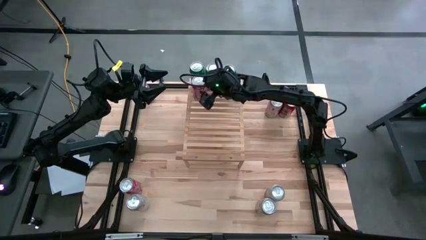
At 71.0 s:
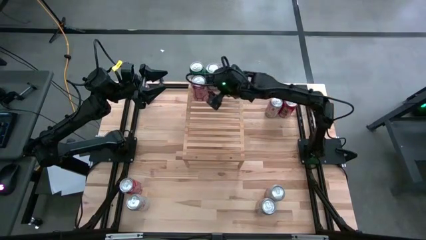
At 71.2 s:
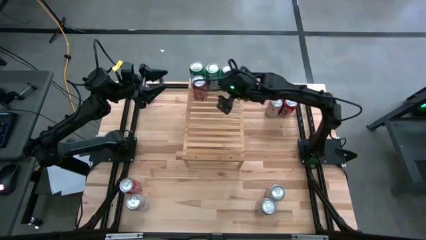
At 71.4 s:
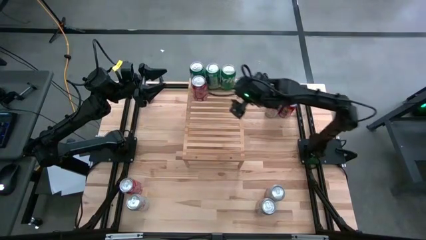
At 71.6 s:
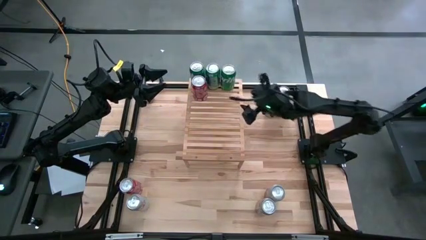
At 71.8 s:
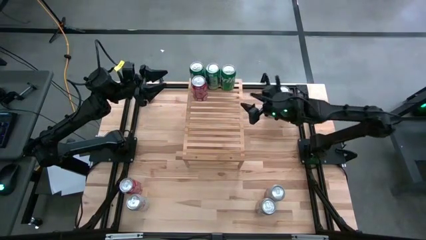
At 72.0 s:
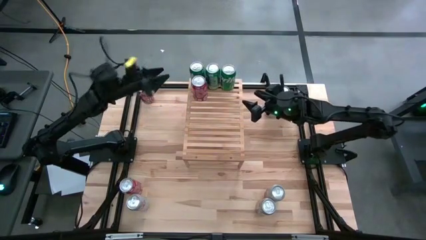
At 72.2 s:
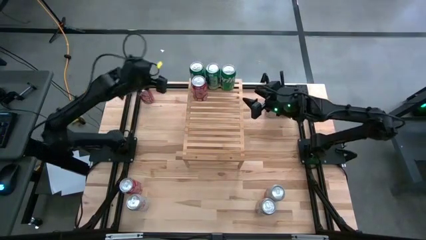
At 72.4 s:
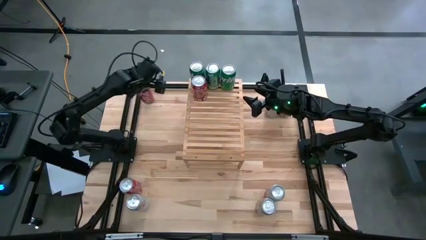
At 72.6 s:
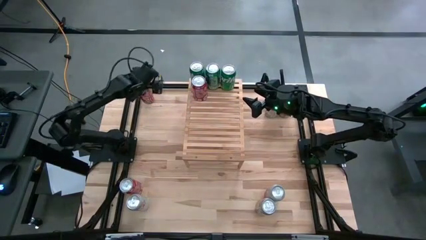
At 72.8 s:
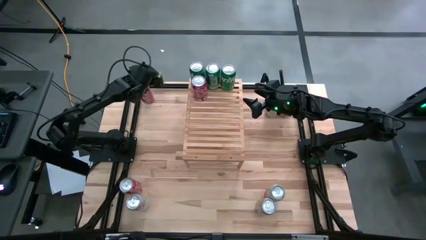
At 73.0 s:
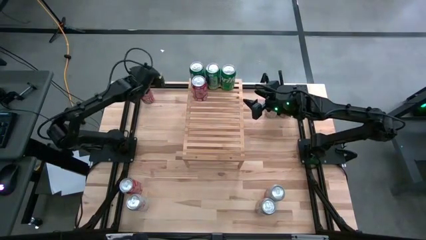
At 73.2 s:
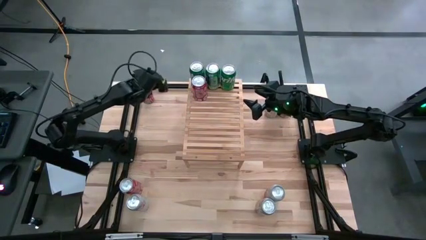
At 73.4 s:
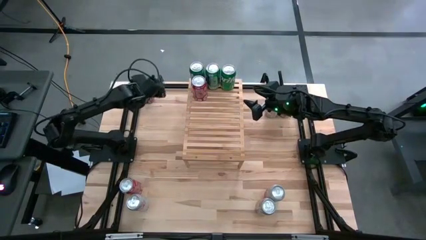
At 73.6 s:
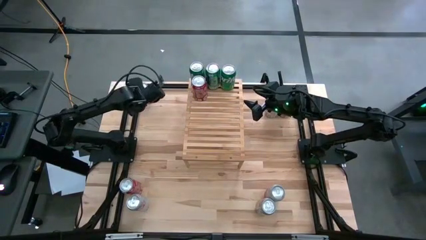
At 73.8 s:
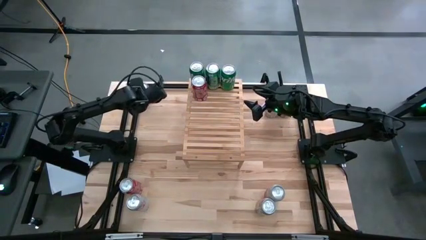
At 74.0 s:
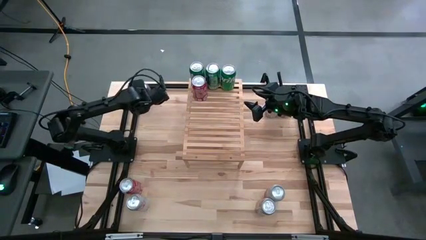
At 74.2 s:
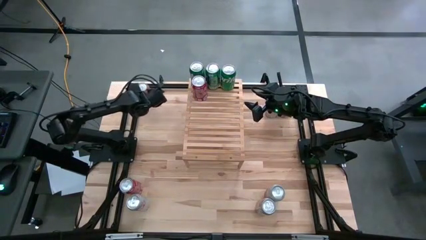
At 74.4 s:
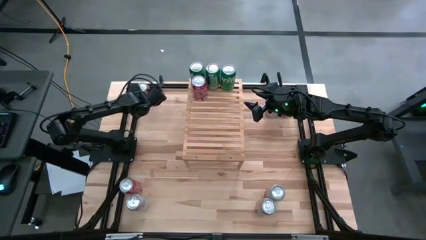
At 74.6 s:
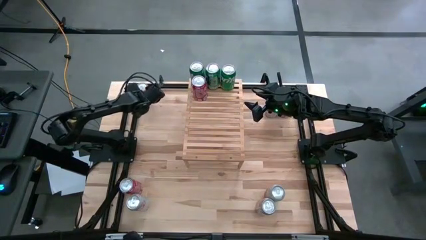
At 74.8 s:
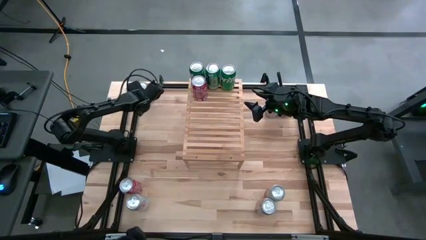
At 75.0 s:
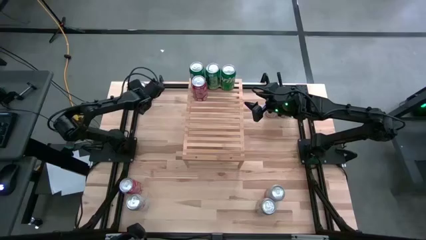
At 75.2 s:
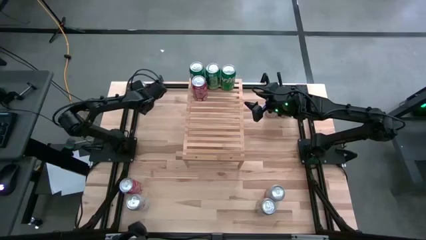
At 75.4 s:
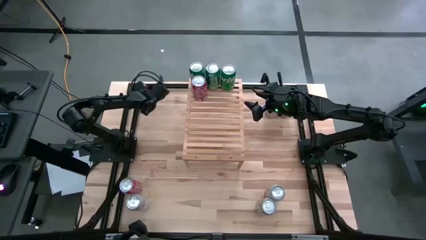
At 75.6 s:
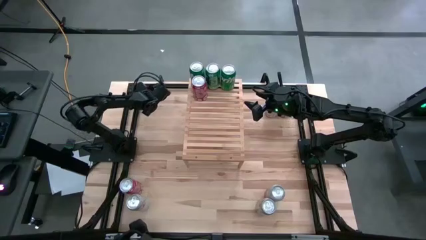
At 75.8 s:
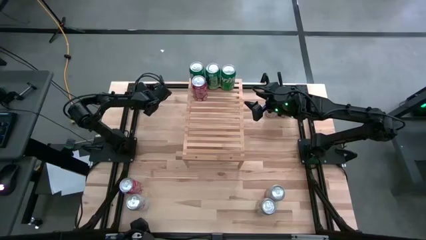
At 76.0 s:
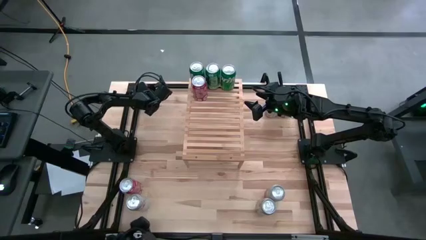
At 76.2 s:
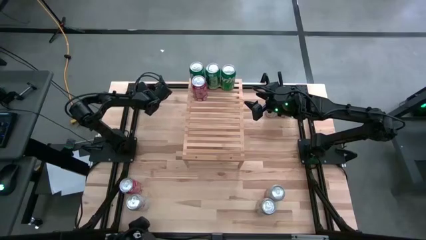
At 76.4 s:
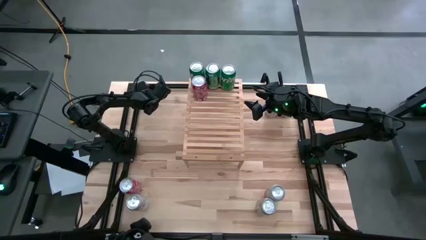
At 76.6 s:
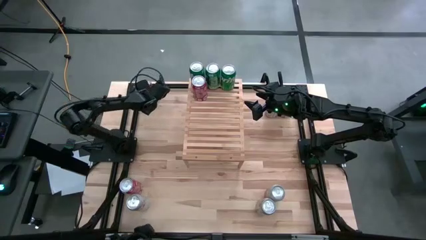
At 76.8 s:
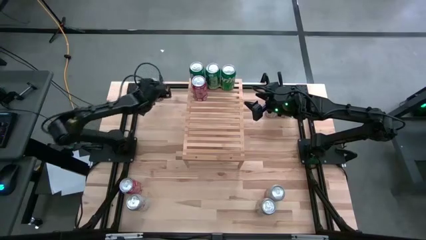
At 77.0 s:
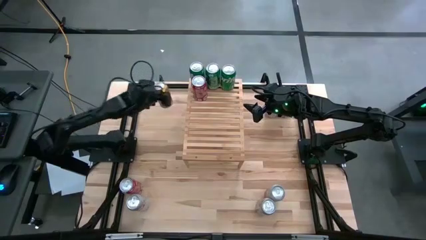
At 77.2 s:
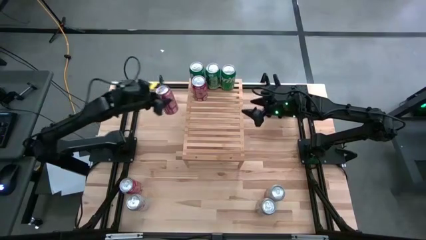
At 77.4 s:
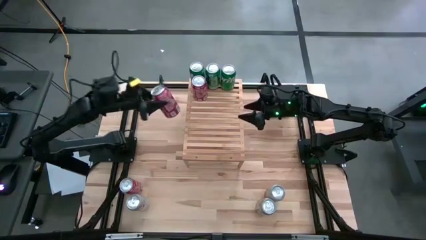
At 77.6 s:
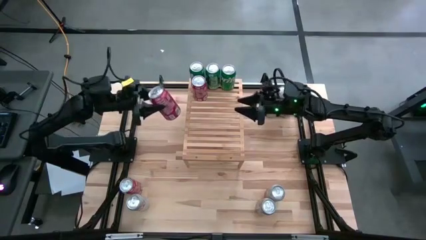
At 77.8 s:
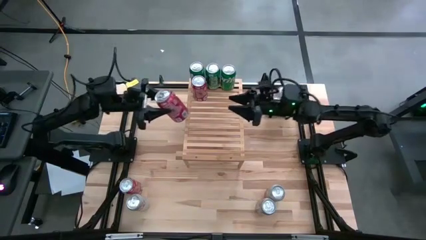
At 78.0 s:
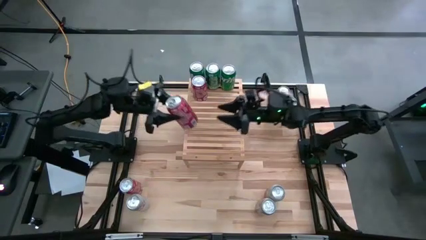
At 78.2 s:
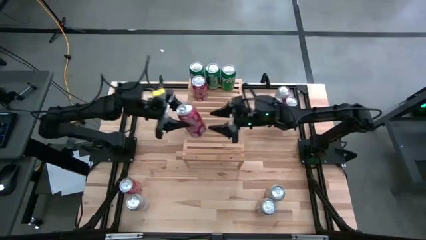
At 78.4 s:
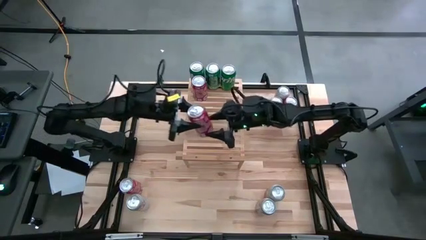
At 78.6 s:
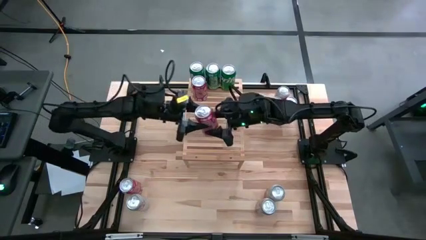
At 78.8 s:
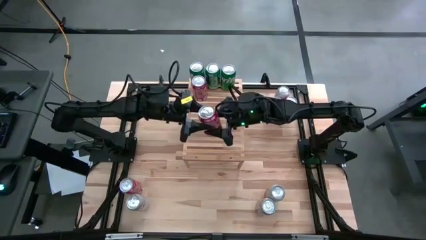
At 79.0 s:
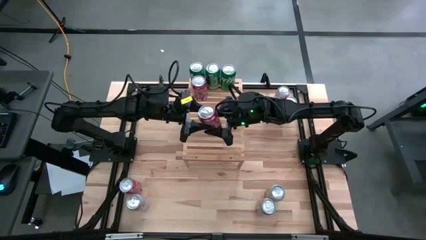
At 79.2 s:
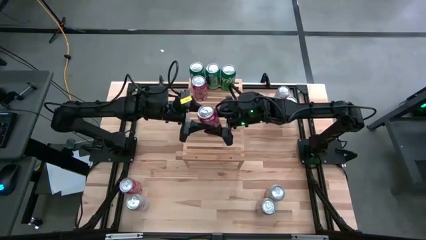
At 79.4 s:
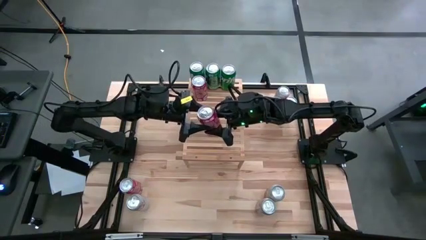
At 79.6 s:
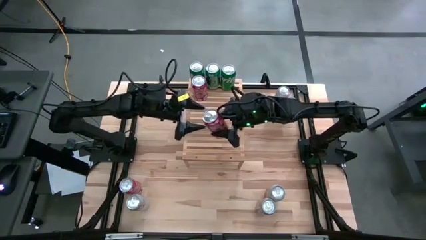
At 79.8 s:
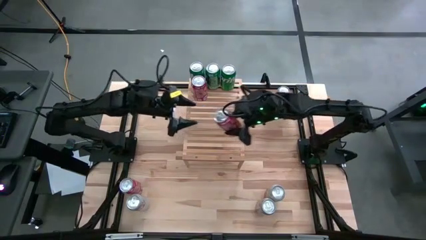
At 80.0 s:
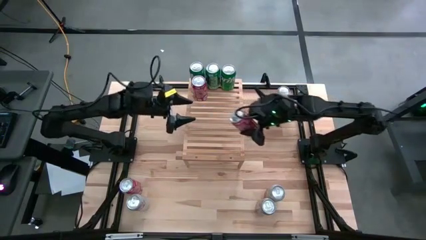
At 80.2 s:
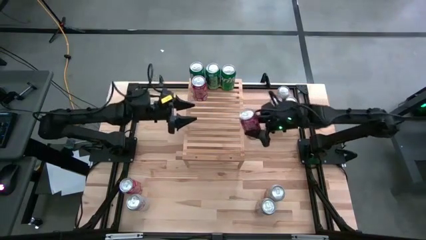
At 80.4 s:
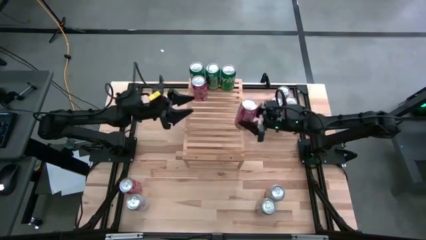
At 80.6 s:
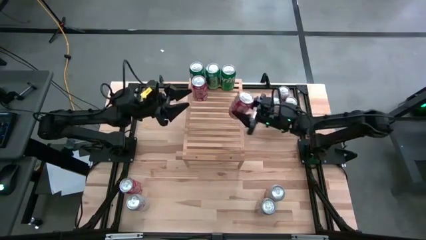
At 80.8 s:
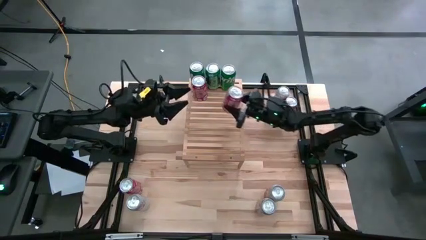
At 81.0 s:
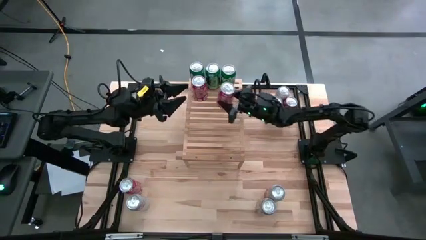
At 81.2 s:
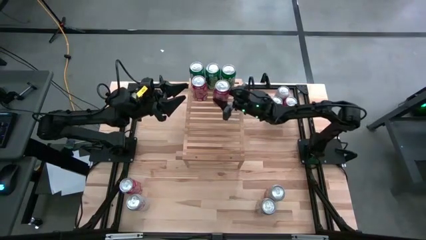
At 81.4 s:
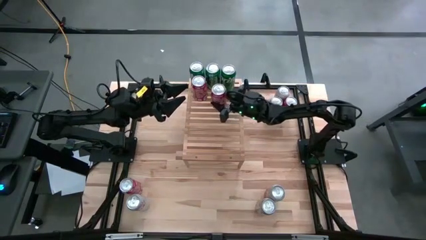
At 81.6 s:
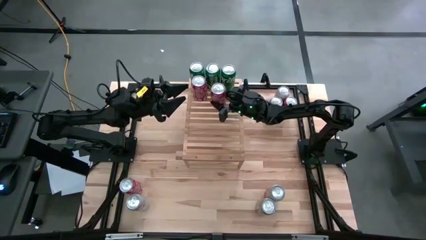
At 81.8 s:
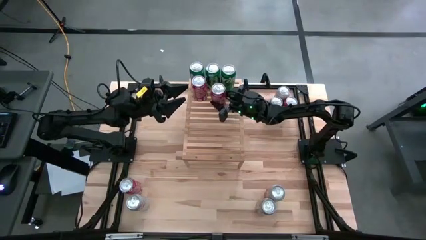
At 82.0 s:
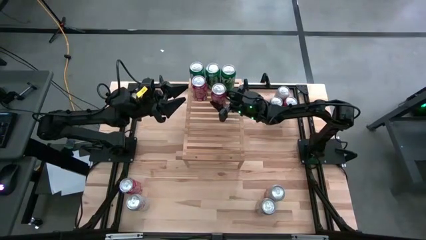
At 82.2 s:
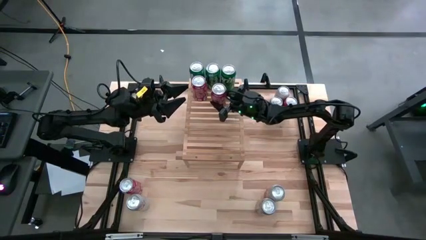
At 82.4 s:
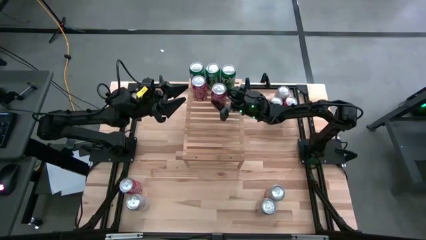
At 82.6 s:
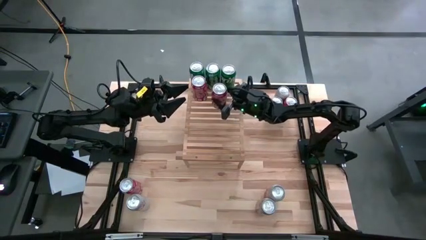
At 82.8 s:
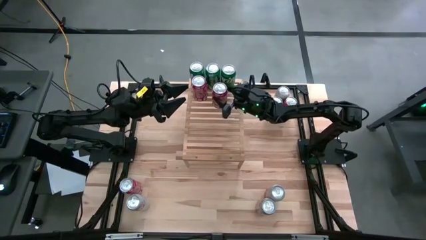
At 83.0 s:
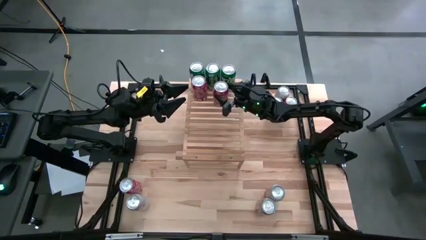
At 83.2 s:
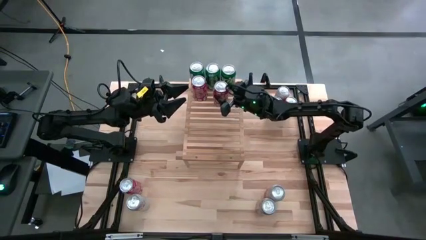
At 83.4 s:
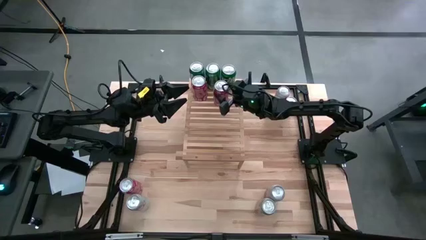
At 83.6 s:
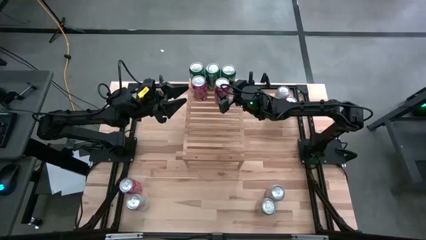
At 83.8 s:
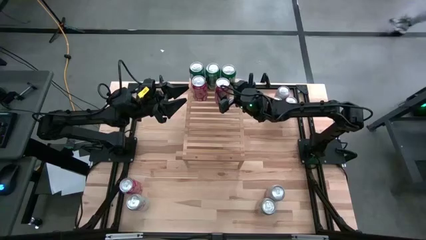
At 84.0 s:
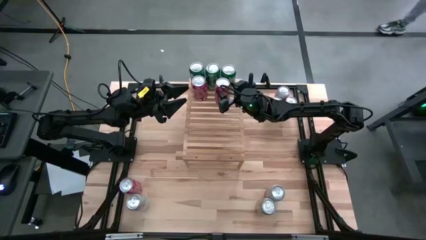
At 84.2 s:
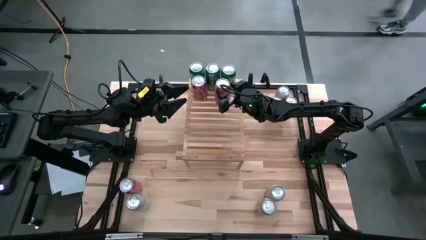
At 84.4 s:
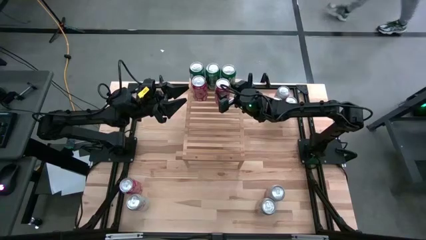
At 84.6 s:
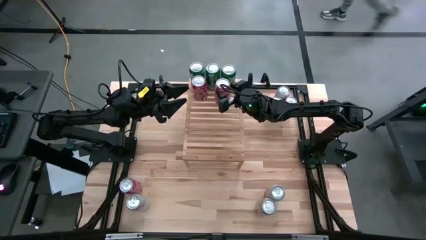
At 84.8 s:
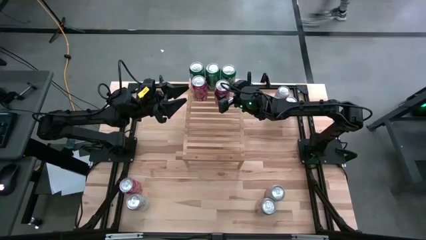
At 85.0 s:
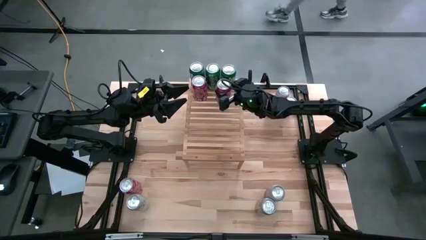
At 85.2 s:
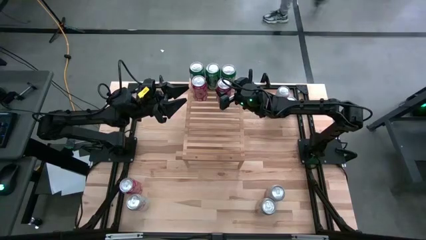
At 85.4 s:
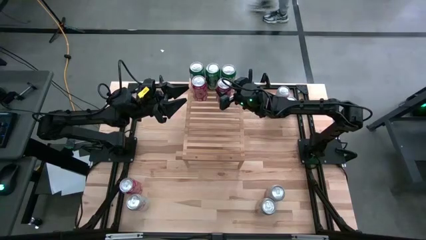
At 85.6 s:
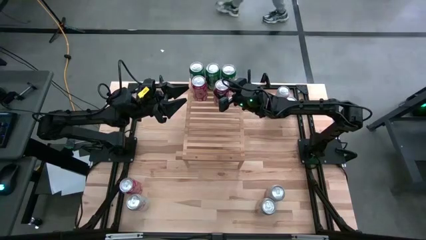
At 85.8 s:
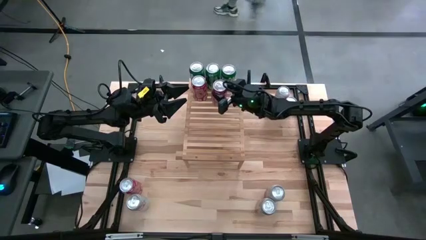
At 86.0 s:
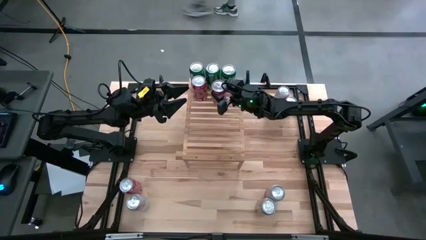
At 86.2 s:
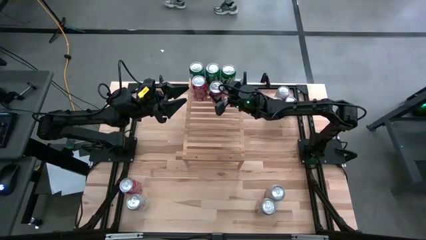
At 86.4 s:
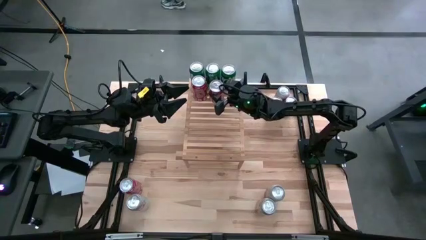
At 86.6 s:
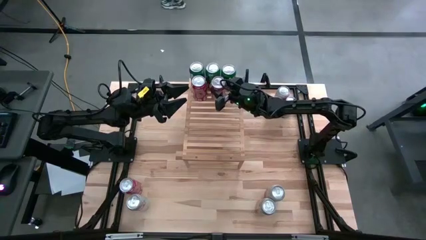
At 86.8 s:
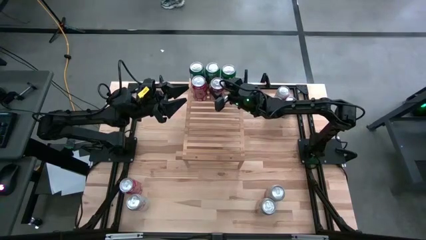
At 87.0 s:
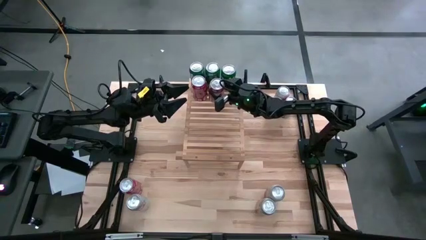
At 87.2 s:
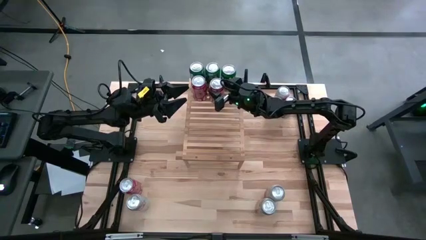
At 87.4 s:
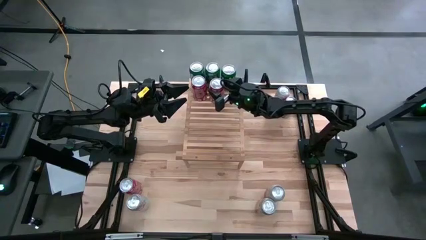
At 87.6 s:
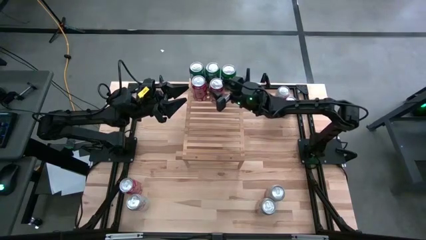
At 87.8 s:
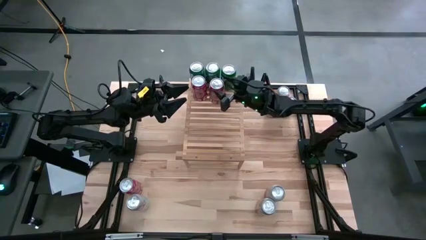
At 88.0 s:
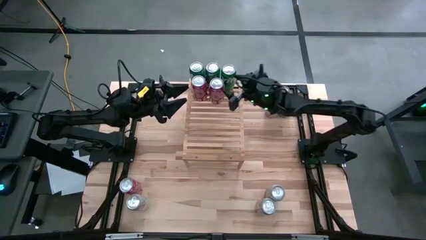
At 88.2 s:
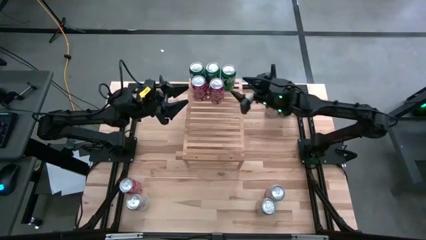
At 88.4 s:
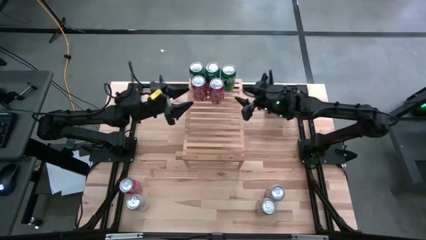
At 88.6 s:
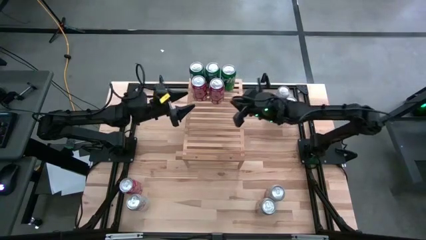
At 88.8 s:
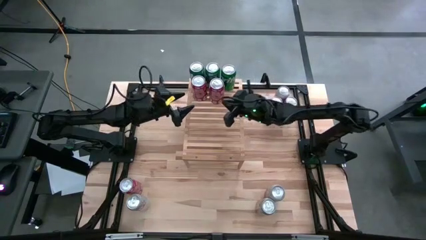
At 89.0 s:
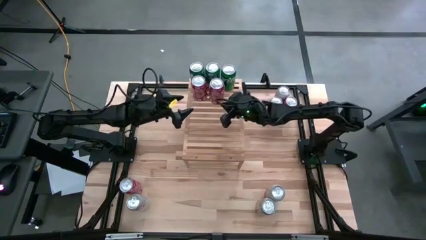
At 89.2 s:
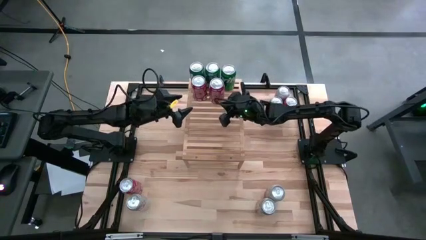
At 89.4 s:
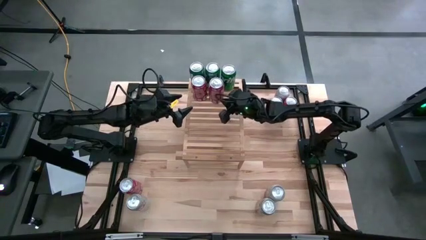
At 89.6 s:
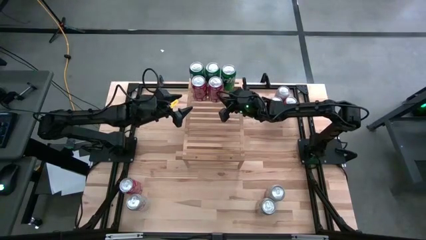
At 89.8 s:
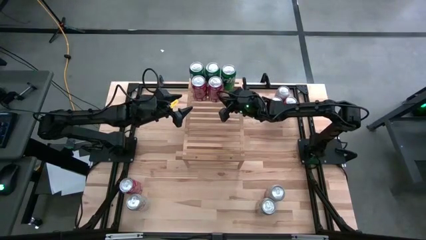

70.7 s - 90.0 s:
Task: Place canned beverage on shelf
Put the top left red soda can on the shelf aligned with the other red soda can
